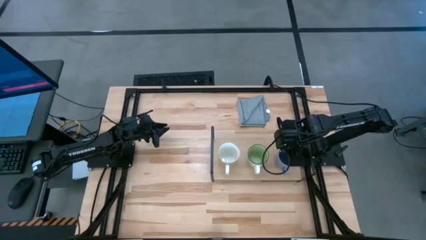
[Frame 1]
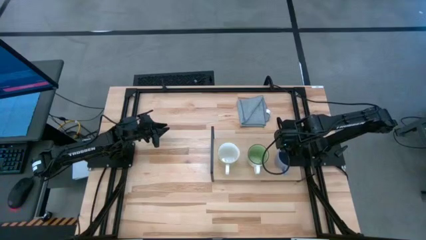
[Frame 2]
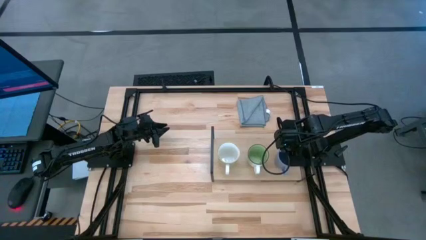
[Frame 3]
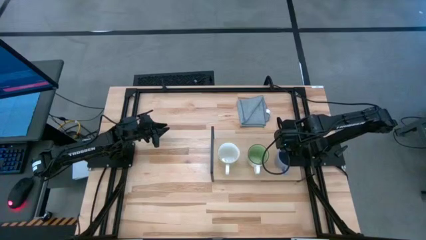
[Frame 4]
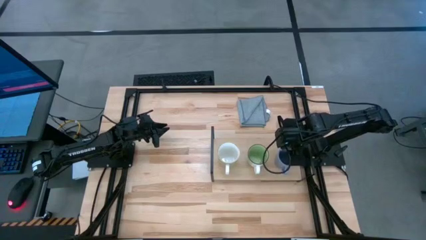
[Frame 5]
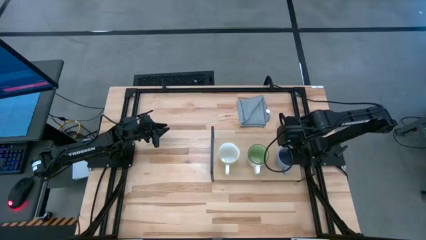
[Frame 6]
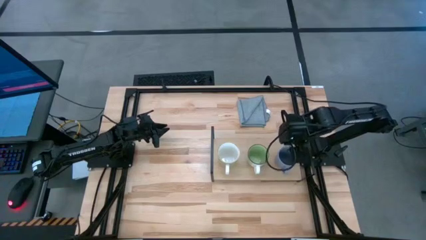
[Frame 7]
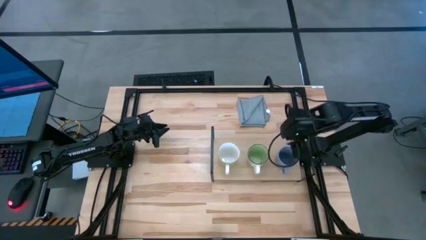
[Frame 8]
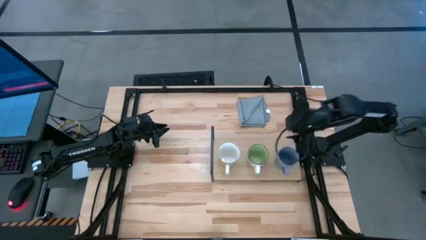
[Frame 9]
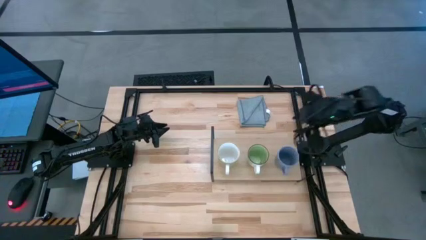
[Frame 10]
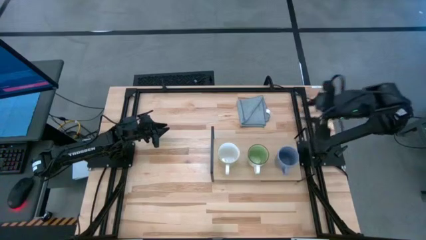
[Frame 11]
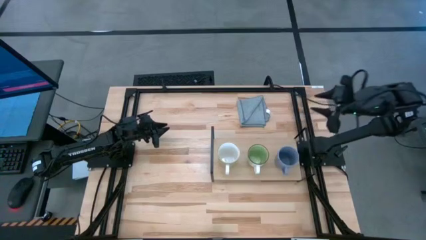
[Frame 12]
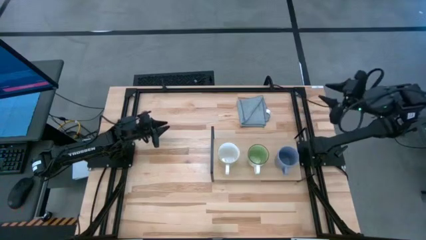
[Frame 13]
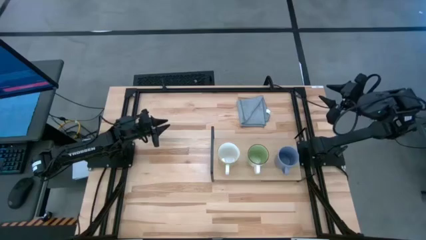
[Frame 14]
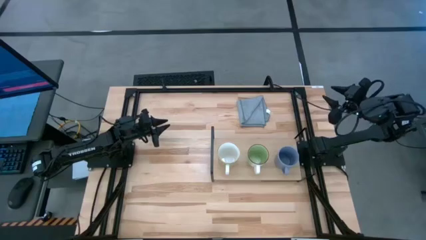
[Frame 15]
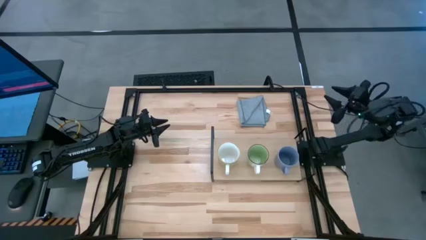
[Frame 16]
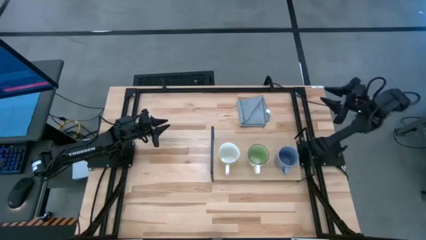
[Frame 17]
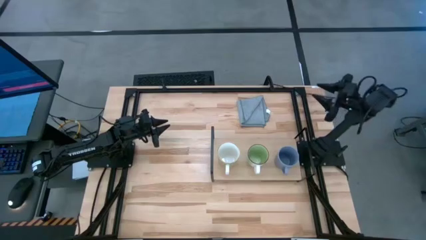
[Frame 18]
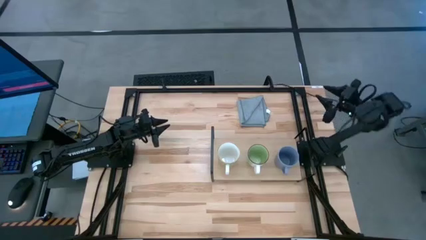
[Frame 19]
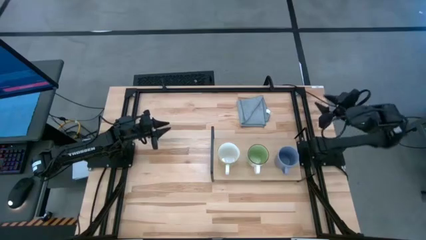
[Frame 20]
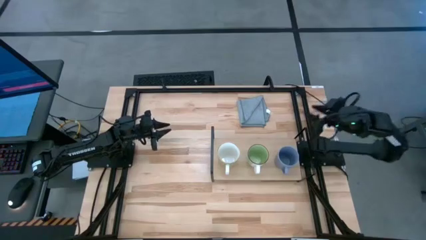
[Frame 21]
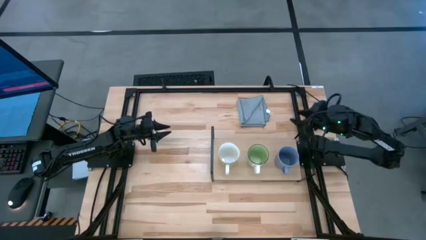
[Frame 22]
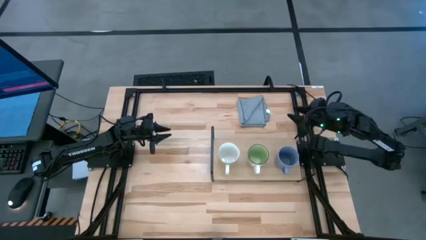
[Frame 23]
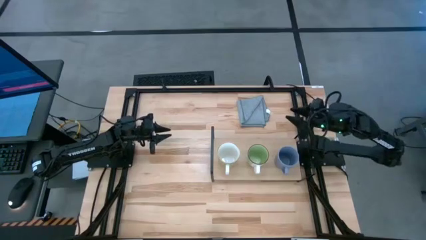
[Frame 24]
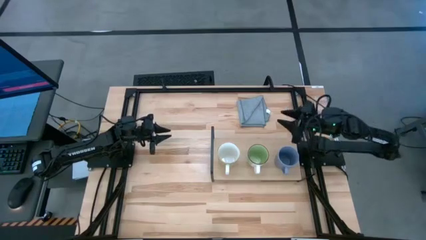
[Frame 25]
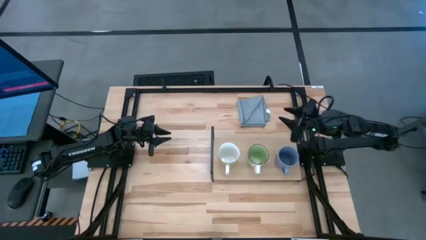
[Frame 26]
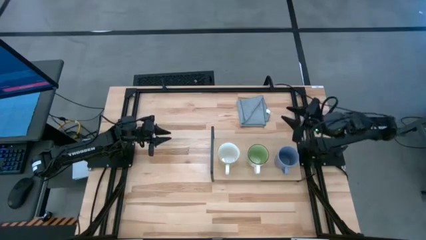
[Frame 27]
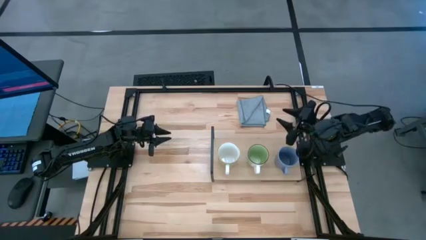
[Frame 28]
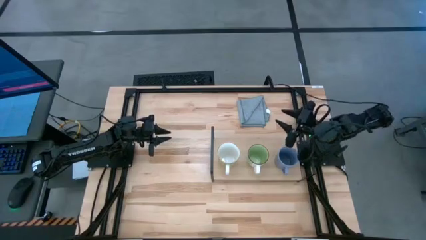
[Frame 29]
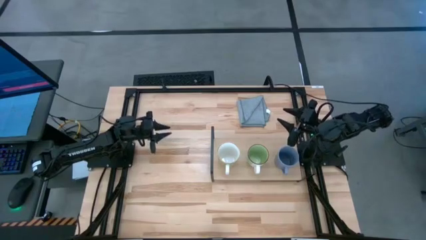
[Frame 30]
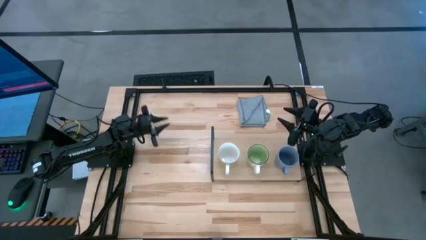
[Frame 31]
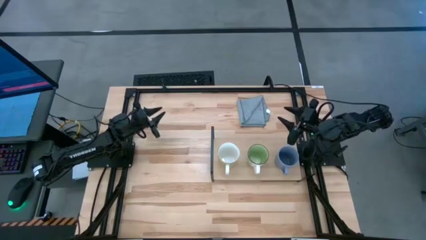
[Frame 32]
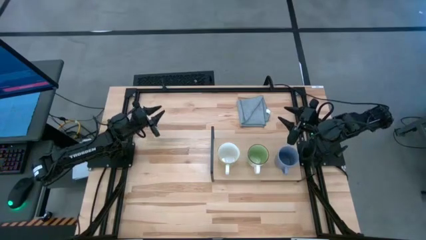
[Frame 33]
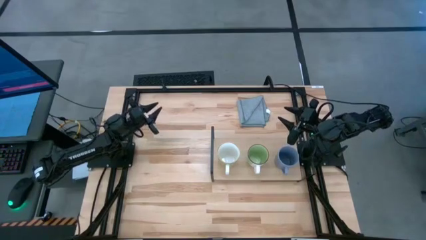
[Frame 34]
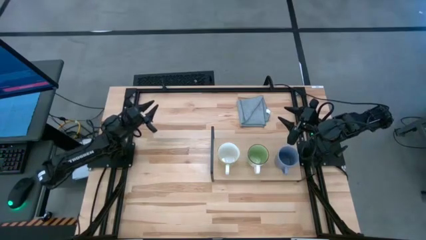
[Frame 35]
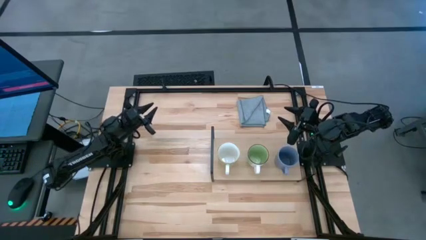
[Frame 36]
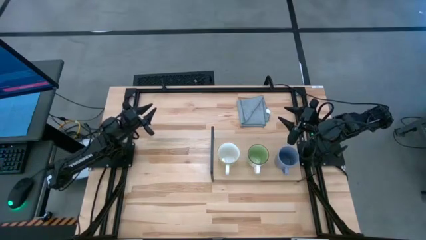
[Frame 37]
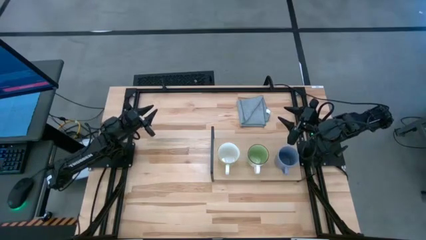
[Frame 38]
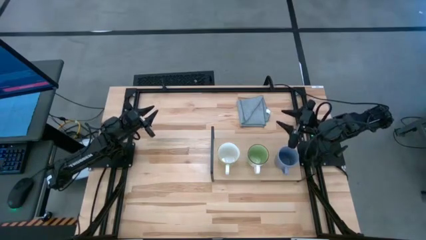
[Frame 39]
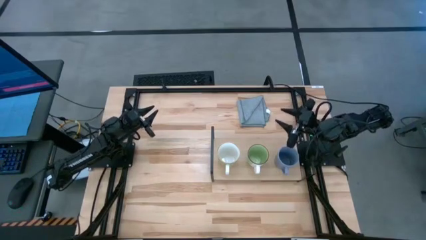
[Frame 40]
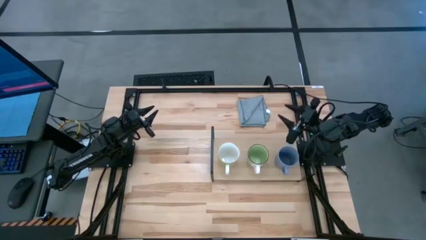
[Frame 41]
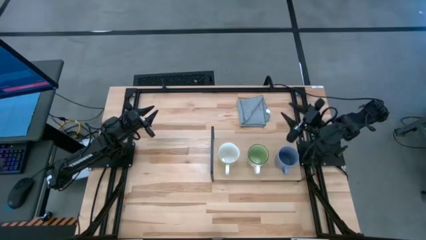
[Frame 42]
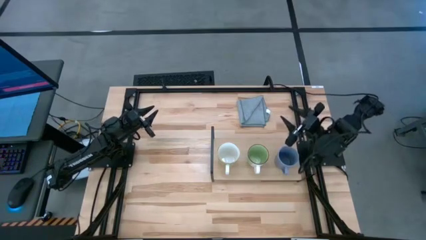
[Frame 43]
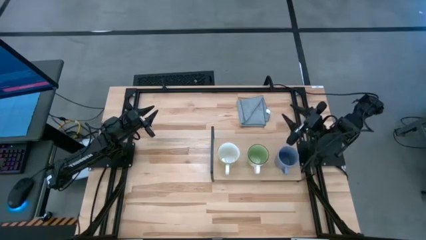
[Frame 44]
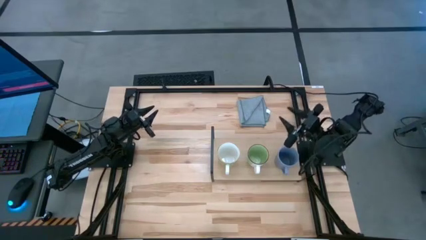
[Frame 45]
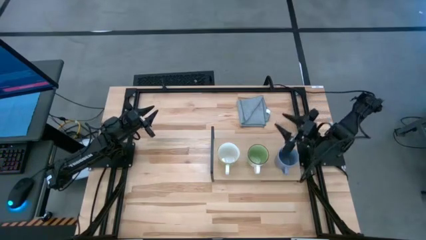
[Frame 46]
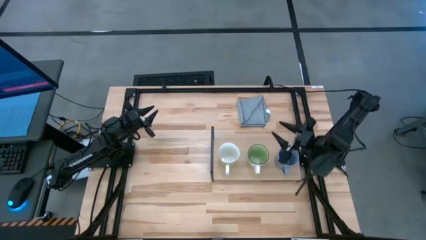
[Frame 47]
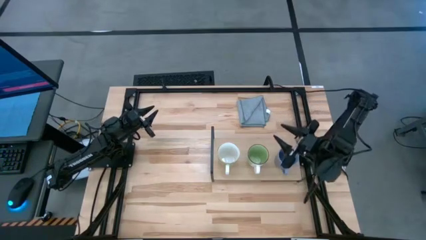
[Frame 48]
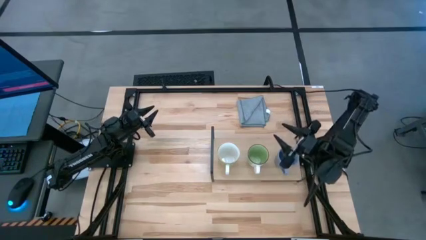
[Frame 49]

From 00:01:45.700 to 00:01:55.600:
Task: Stack small to large cups/mugs on shelf
Return to Home Position

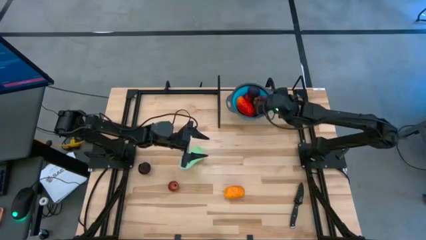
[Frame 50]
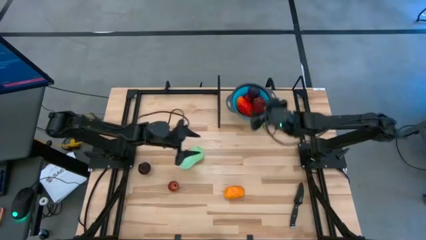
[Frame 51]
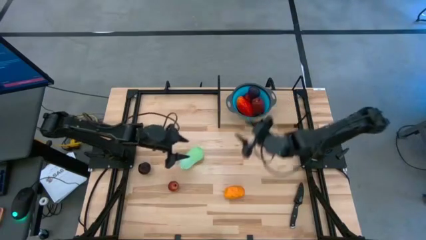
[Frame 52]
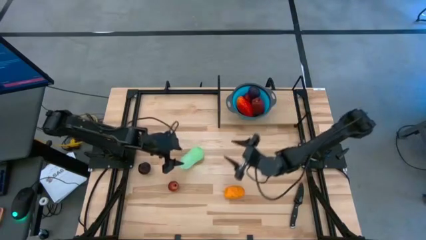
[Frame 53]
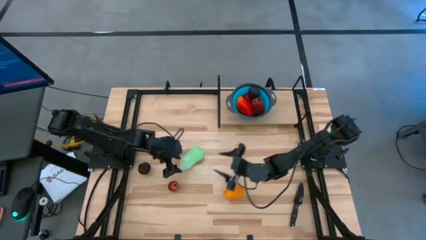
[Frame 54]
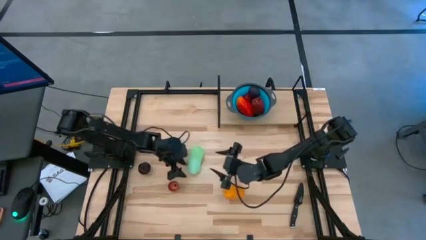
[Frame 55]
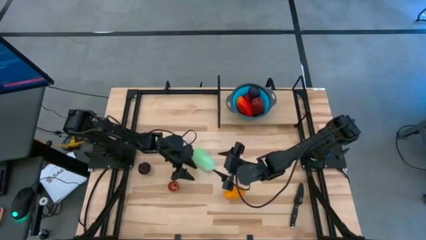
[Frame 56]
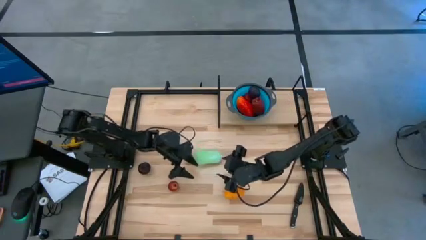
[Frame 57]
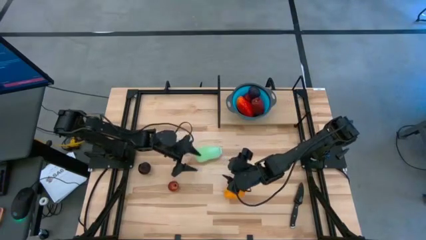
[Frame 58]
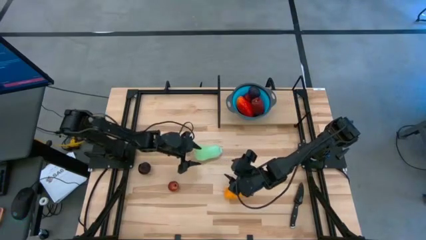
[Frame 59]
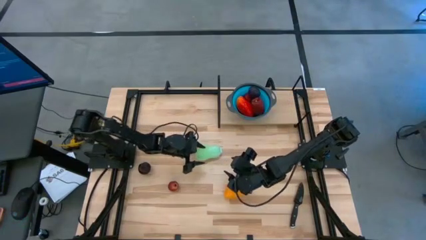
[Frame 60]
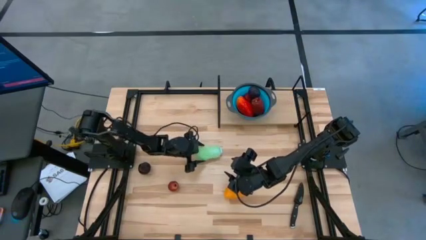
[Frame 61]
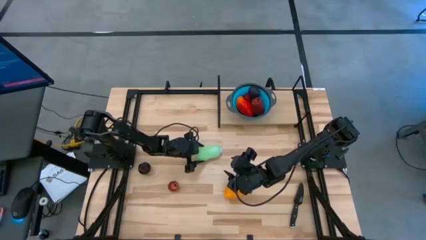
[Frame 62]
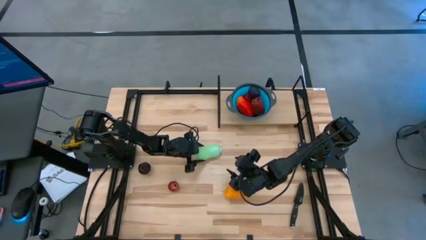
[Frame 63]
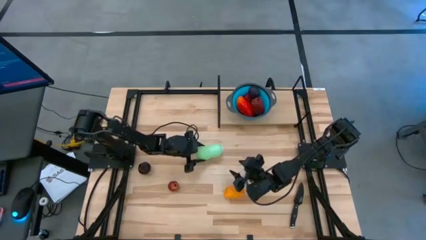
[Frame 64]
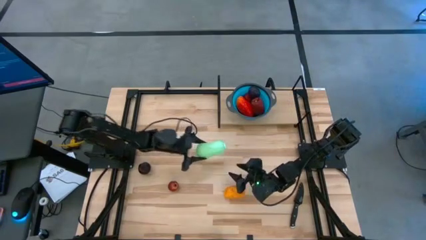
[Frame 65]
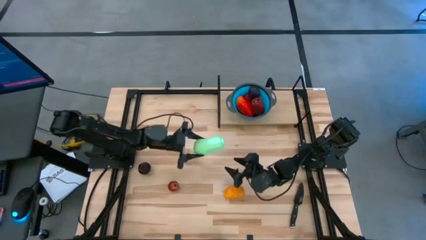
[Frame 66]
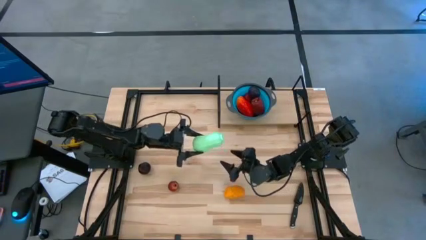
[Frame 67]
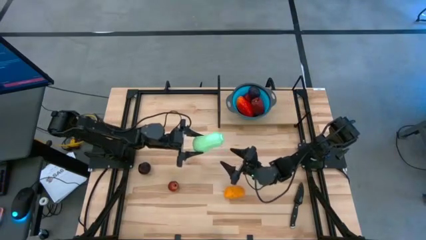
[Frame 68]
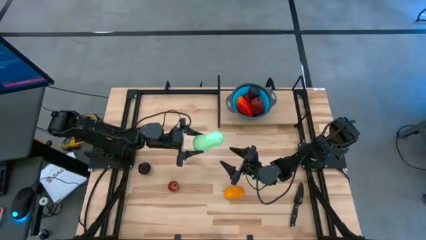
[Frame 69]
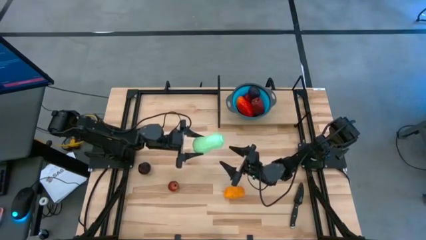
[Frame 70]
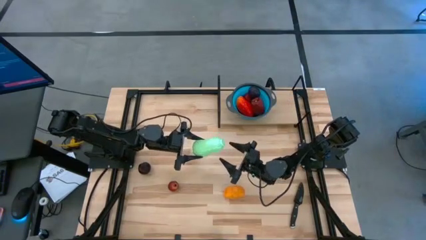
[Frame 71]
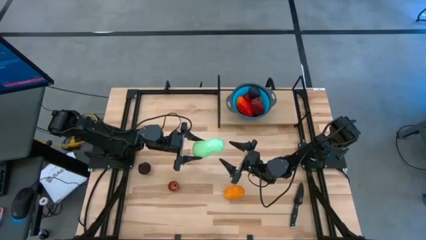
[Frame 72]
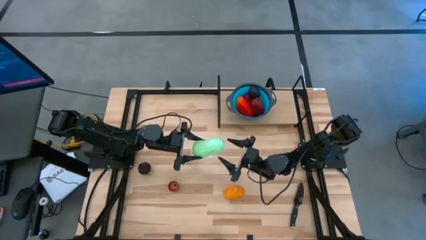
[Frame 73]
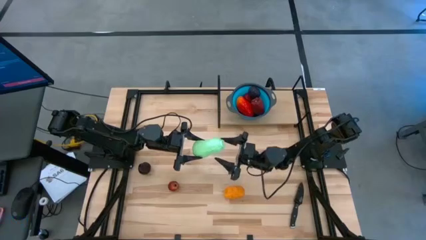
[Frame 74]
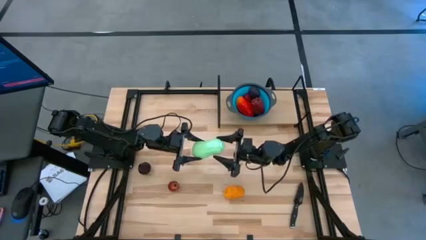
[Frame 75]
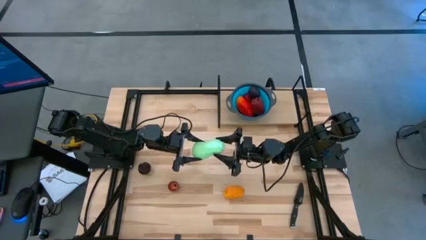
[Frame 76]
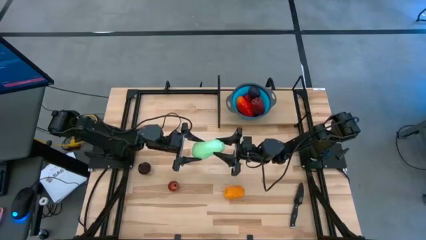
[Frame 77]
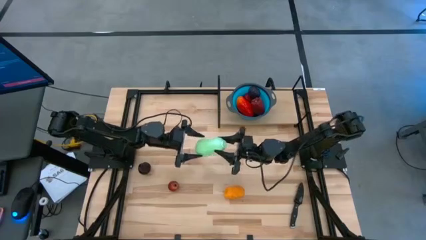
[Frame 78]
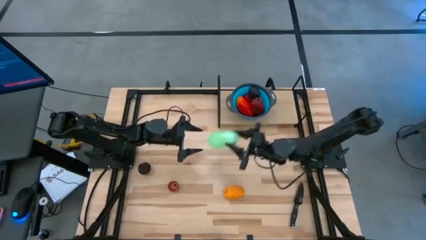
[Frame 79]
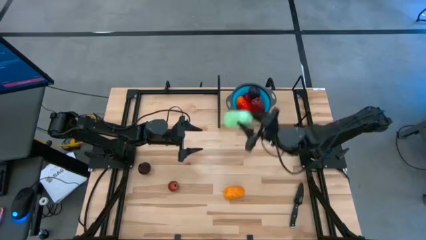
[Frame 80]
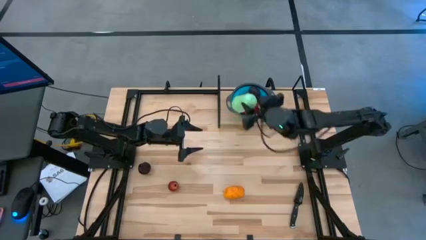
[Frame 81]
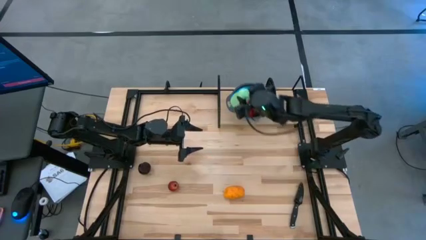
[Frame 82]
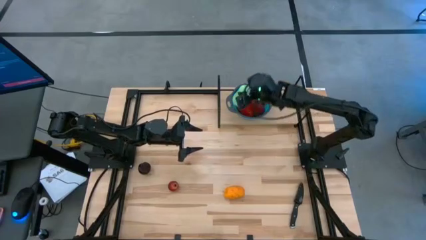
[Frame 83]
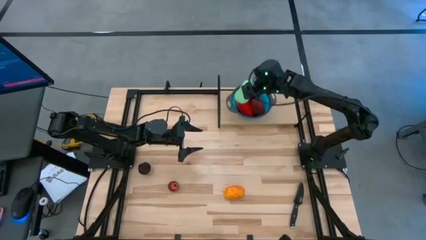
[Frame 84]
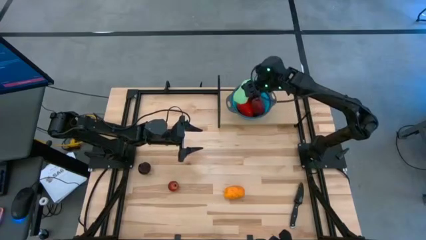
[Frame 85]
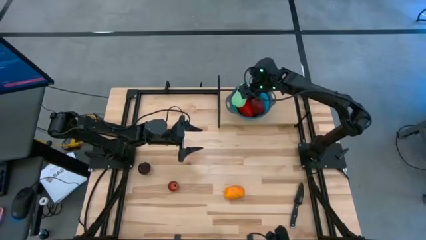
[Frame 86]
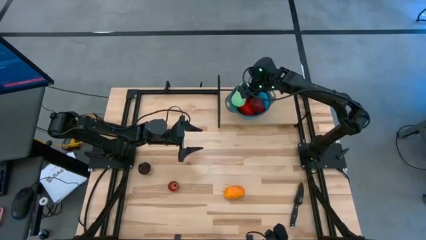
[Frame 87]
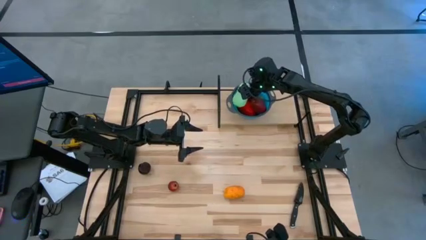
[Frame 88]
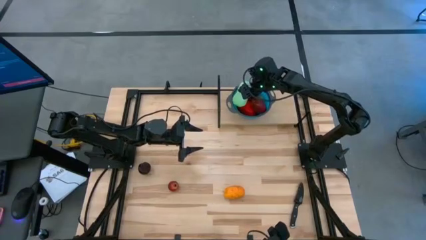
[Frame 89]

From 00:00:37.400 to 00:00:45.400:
Task: Pick & Place Fruit
Put the green chayote into the blue strainer bowl on the shelf
